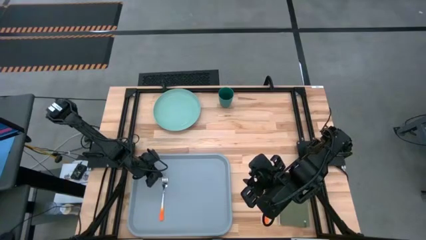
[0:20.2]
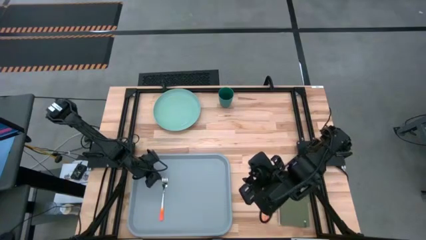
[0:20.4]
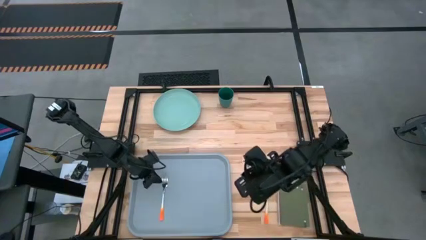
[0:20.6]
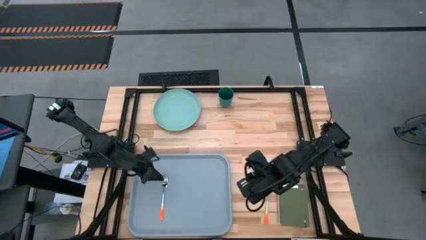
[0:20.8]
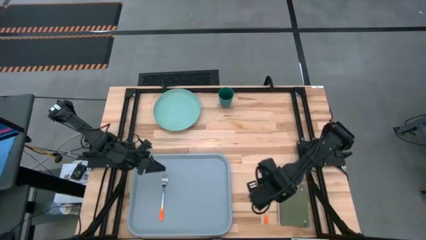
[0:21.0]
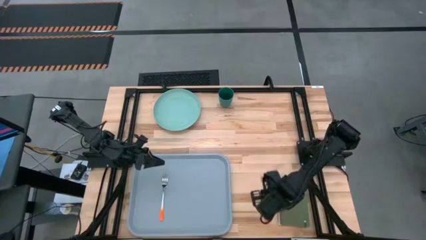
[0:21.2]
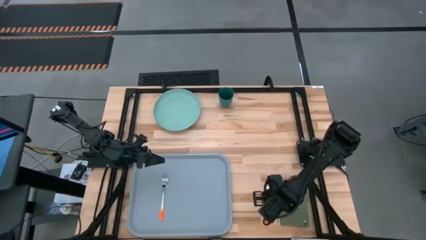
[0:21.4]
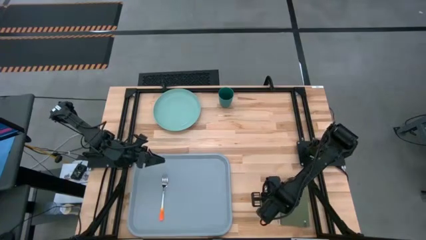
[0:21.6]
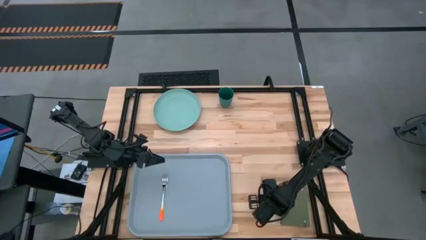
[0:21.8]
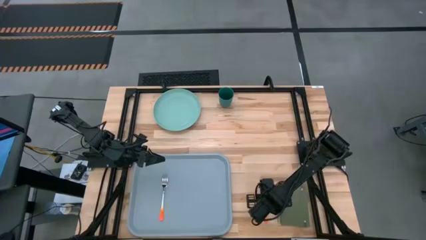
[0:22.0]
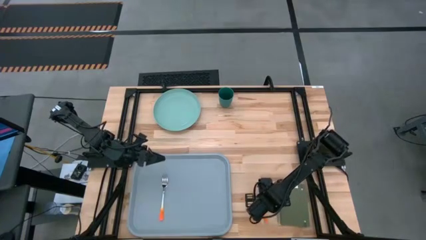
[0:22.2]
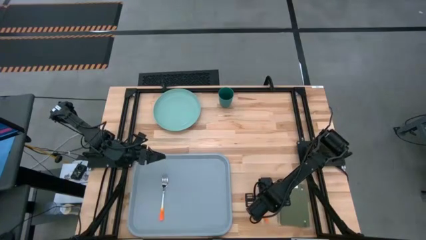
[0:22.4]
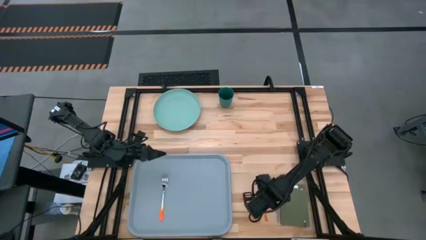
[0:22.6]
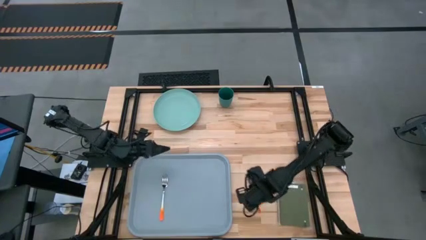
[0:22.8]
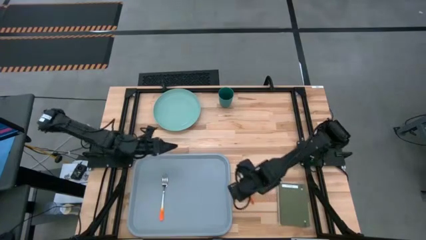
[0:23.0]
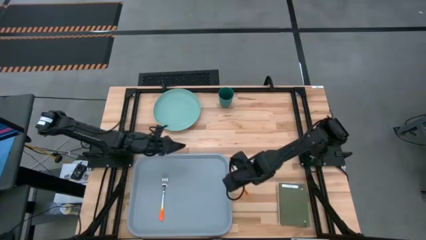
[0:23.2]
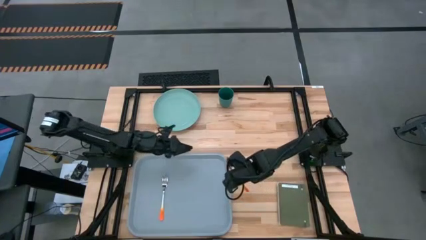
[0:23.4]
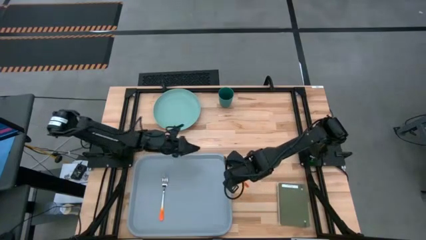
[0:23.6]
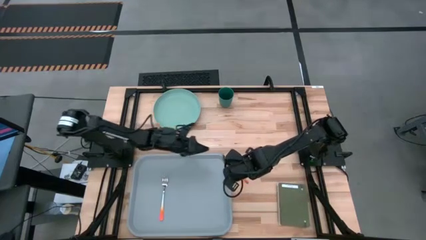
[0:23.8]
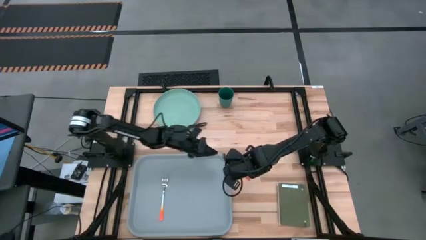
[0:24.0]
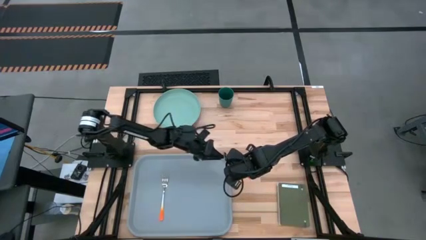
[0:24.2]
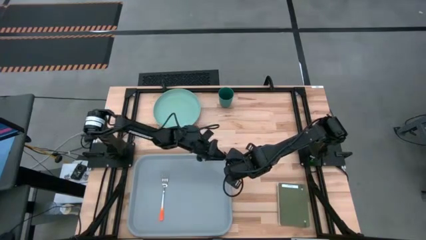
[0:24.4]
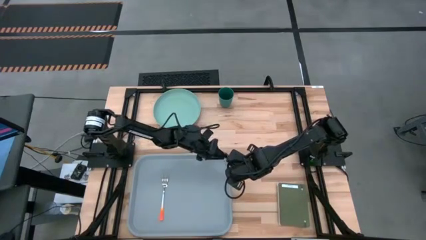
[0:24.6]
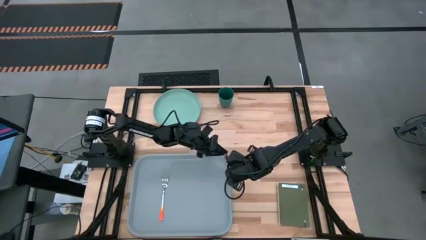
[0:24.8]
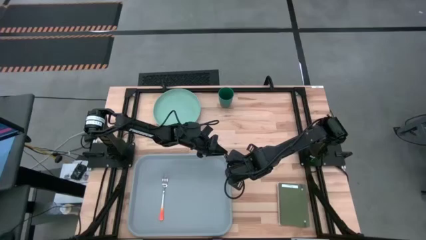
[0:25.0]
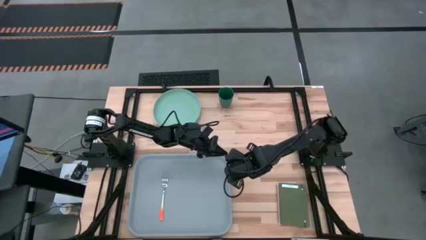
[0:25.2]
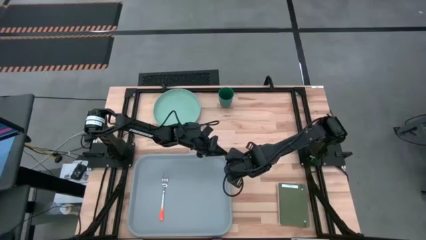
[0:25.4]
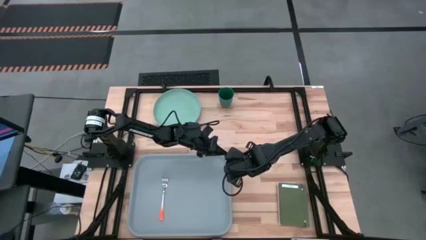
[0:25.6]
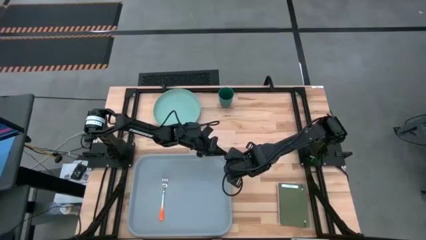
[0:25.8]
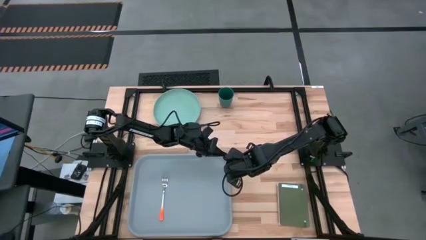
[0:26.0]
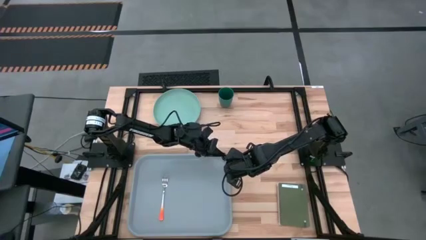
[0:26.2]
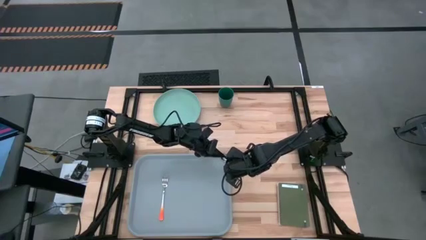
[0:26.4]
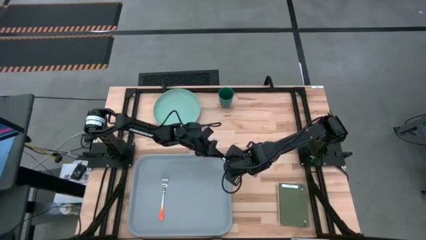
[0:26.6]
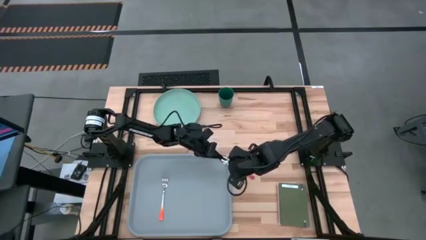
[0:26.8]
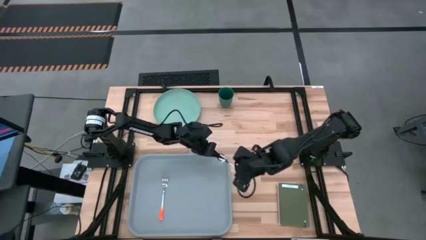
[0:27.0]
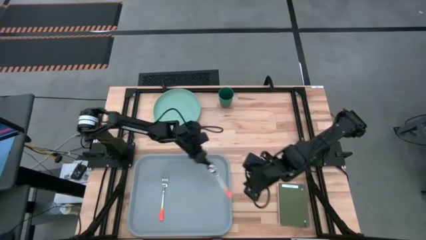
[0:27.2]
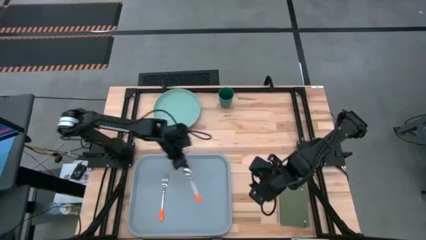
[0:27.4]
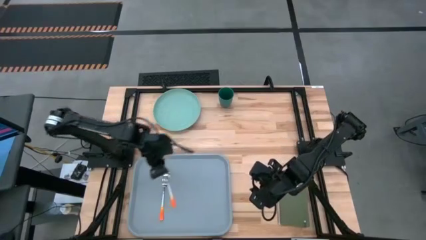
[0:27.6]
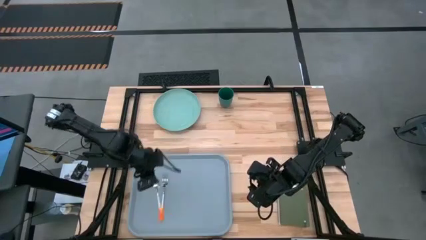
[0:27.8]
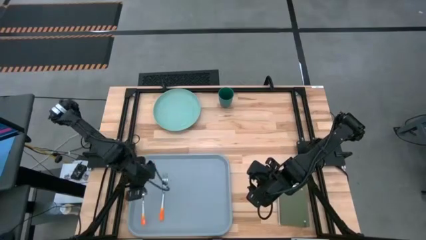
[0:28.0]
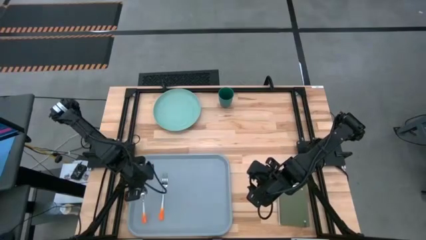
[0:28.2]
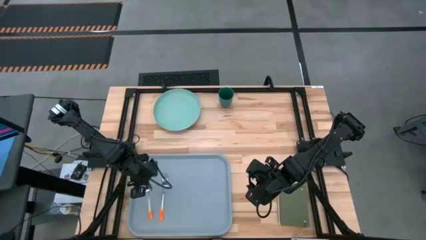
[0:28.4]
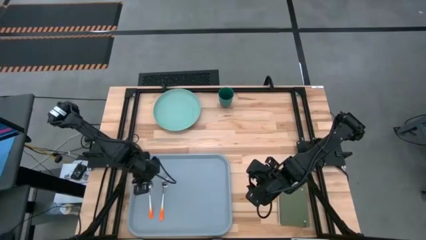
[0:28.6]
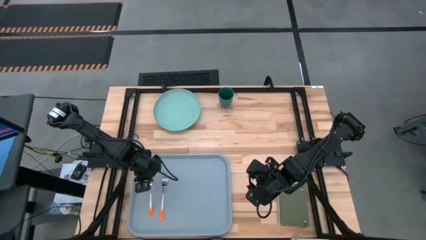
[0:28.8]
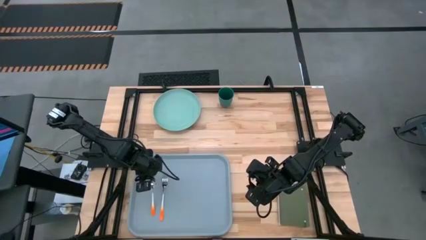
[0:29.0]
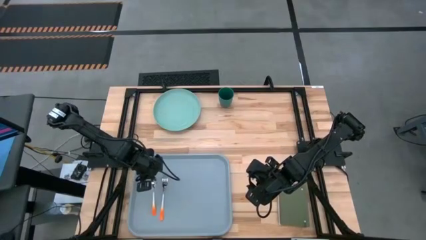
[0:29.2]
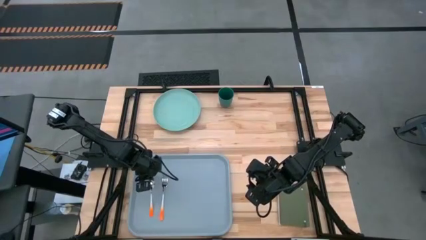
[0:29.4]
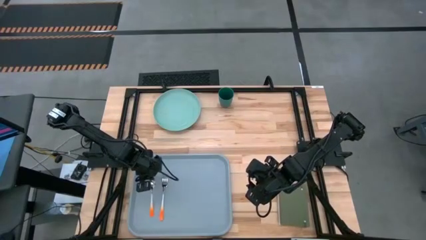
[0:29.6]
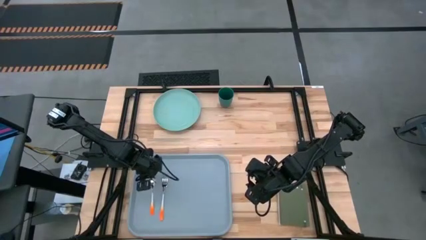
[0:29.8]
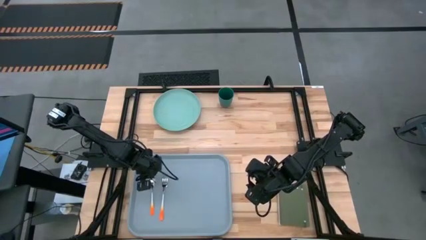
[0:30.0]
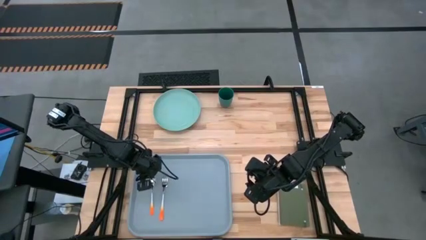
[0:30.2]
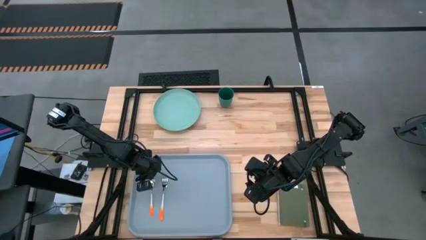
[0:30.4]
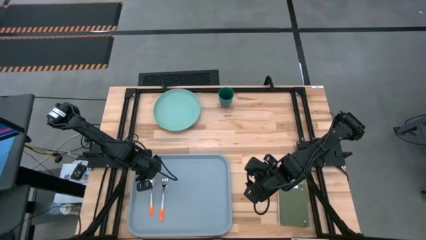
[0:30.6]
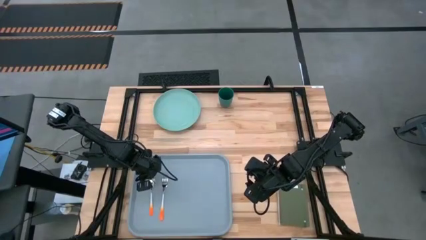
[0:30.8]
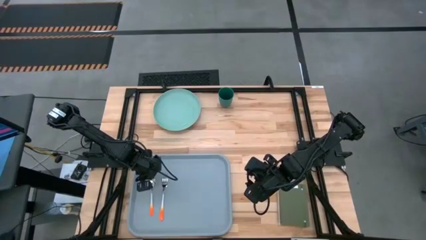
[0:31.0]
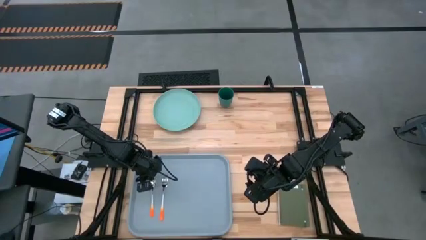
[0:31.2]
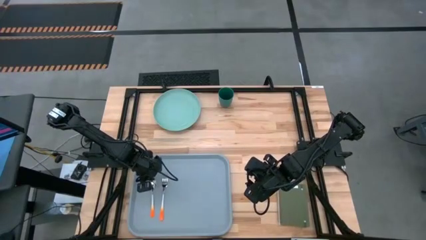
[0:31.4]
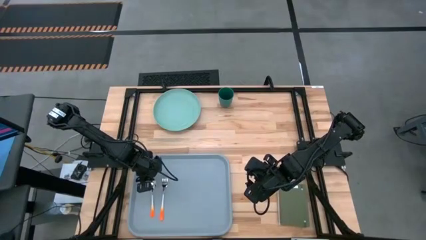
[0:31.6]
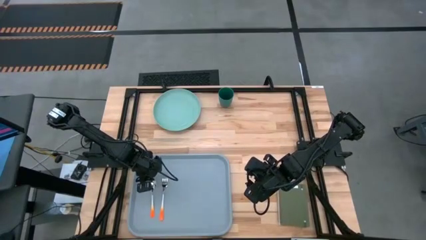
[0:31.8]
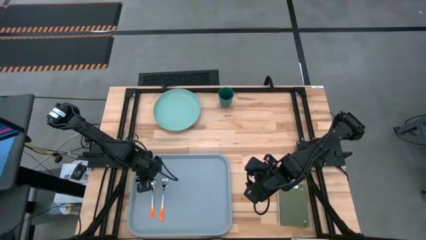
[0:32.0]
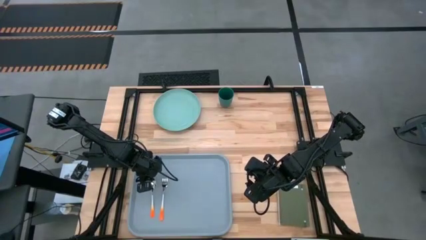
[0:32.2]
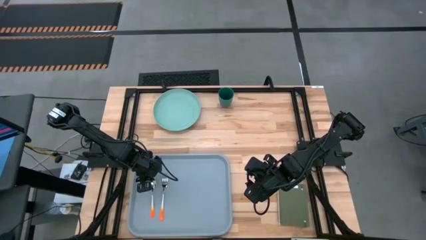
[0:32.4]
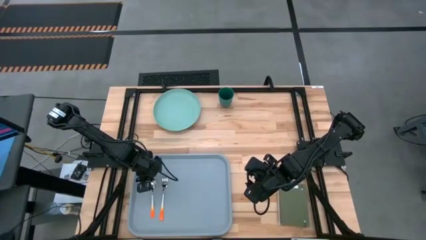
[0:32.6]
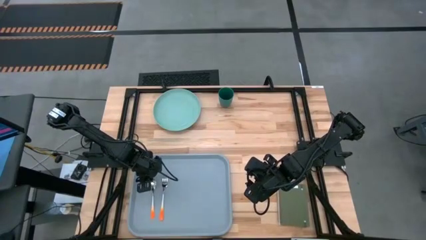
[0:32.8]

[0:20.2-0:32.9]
Task: Pick and place plate/cup/fork/spoon on tray
Put the orange spoon on the gray tray to the left of the orange fork
